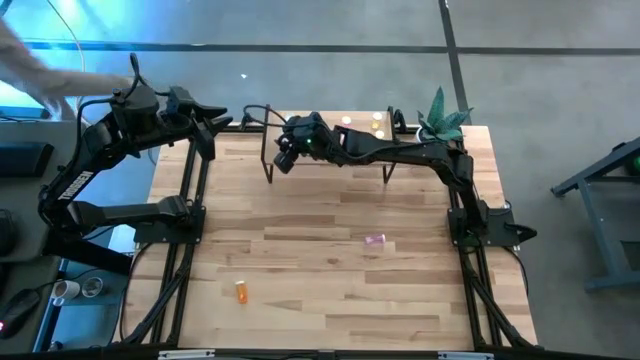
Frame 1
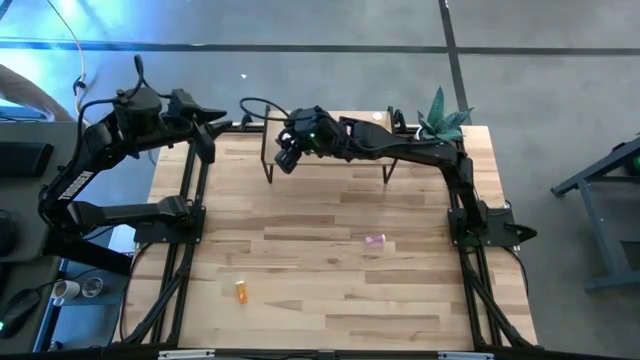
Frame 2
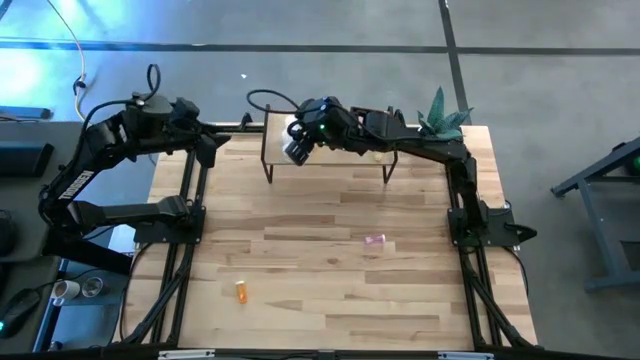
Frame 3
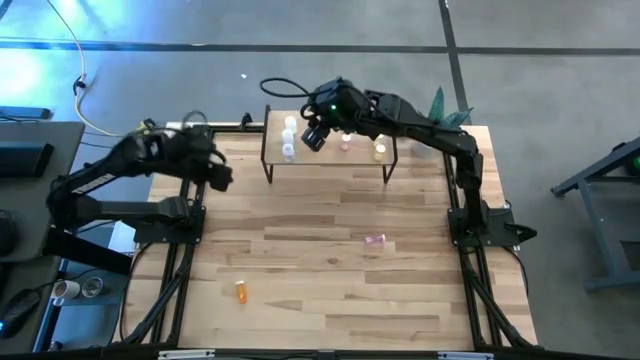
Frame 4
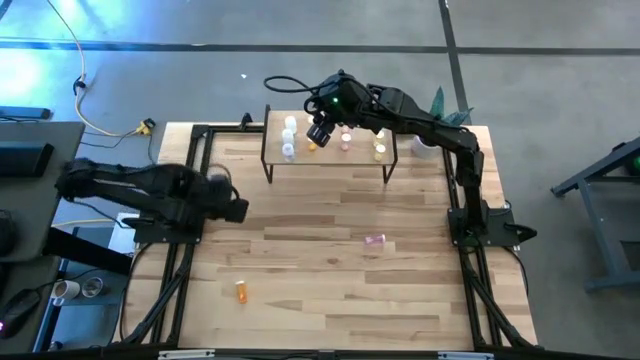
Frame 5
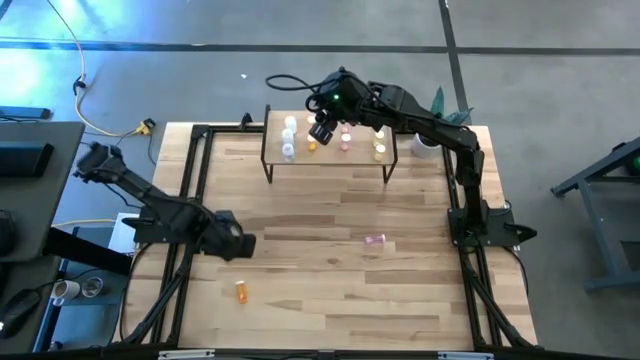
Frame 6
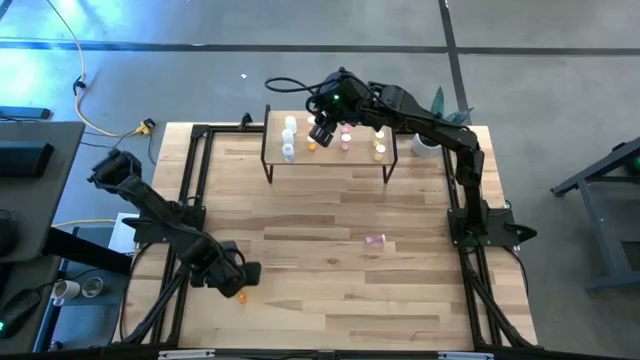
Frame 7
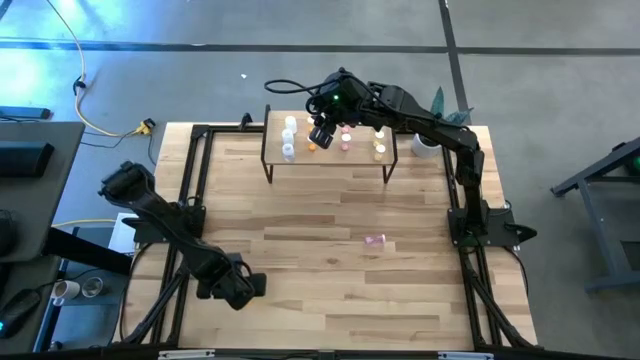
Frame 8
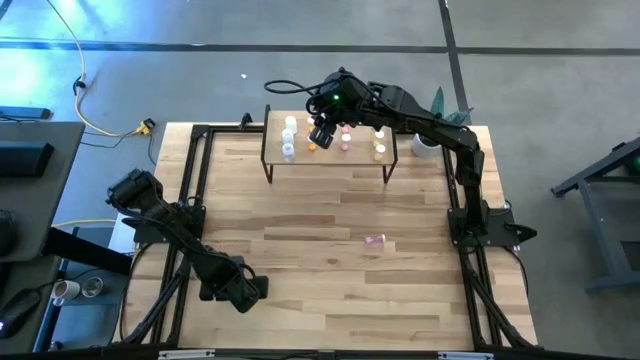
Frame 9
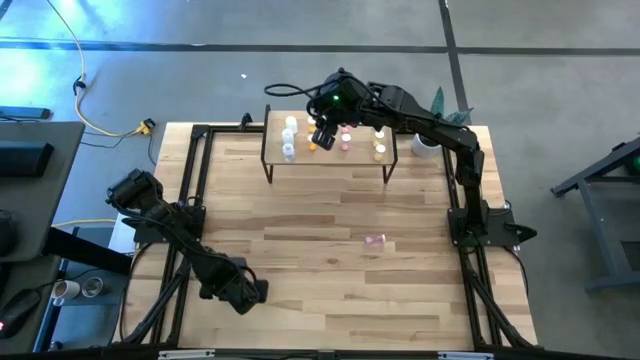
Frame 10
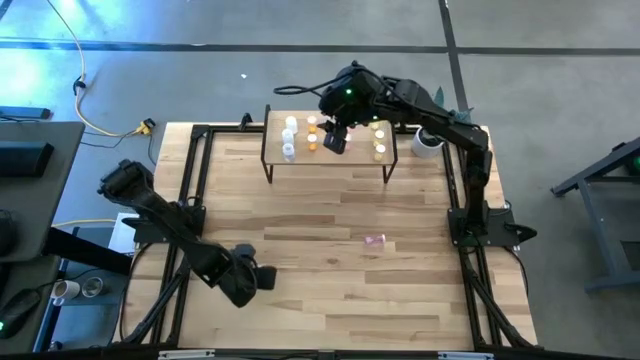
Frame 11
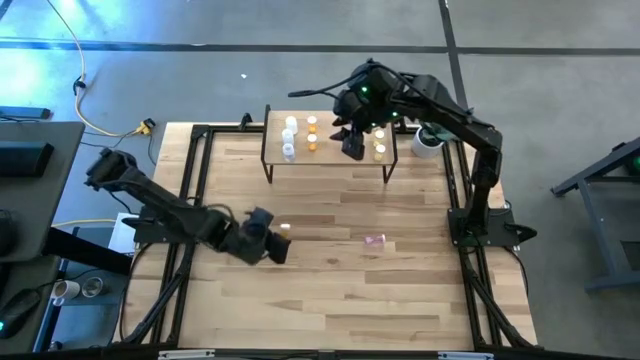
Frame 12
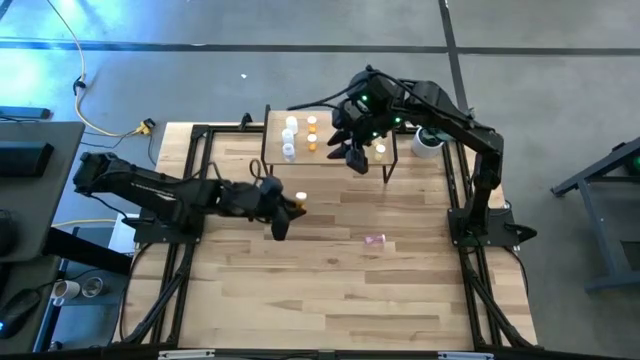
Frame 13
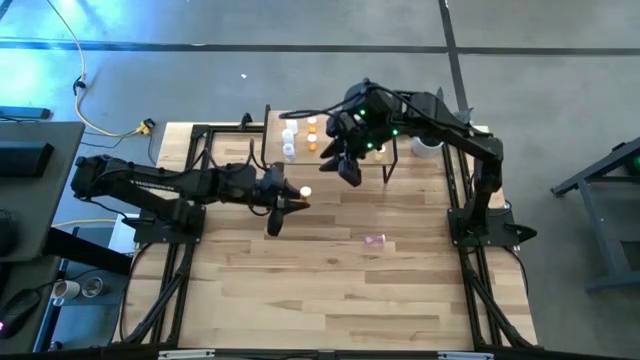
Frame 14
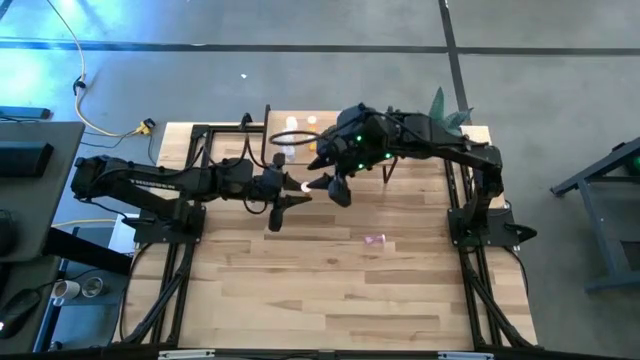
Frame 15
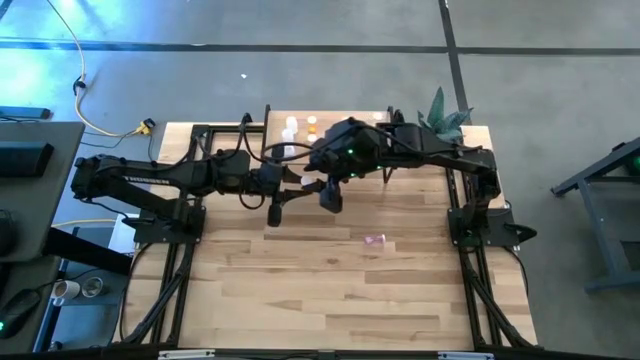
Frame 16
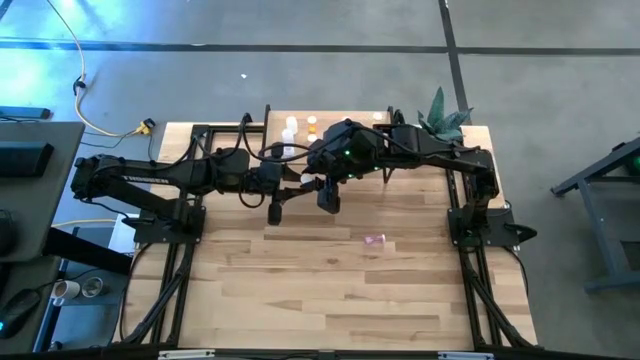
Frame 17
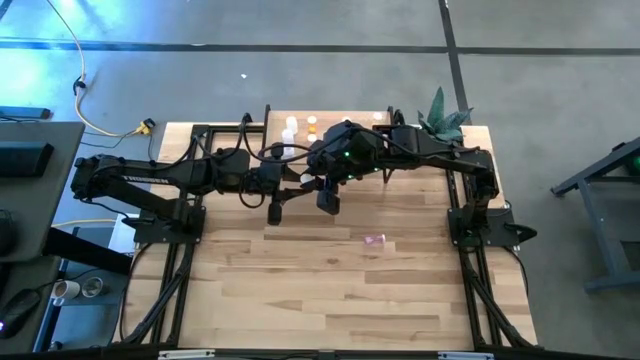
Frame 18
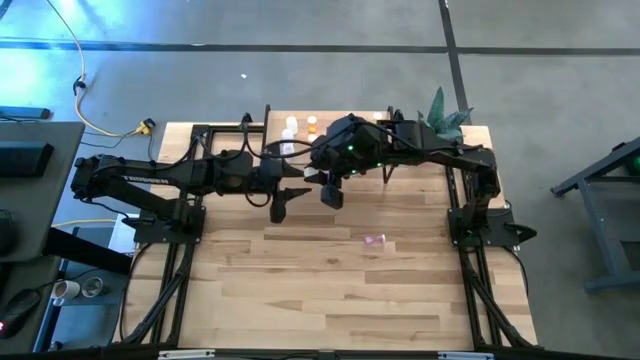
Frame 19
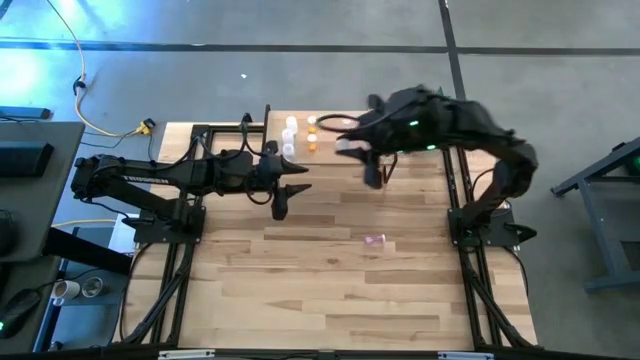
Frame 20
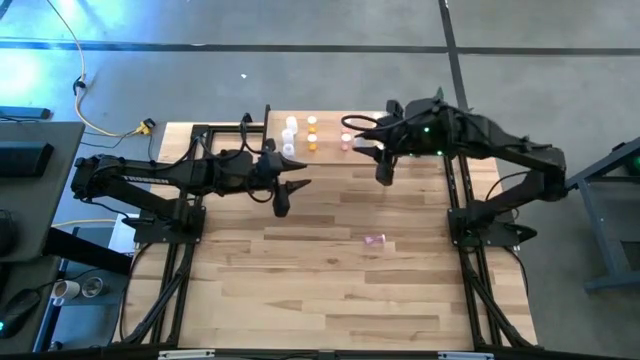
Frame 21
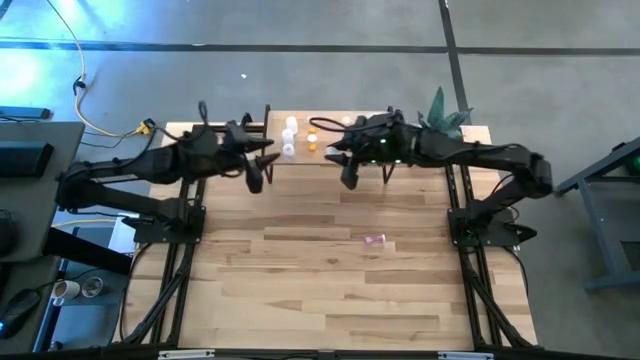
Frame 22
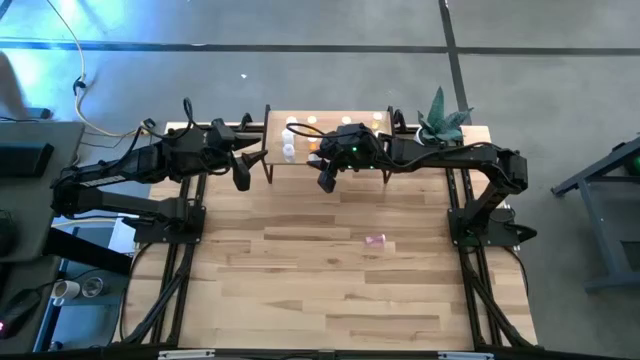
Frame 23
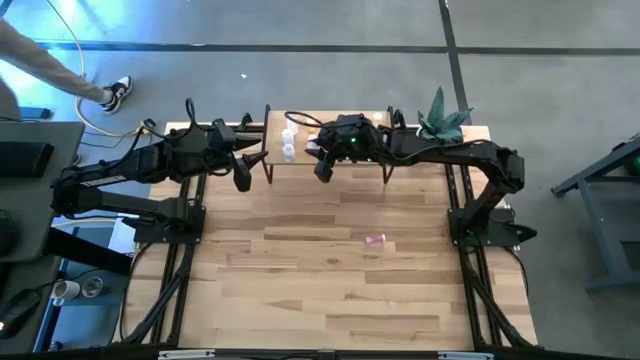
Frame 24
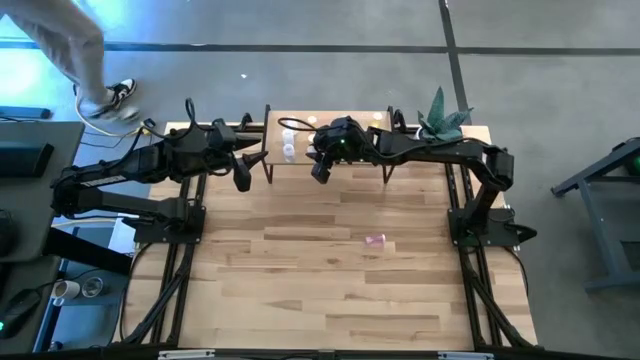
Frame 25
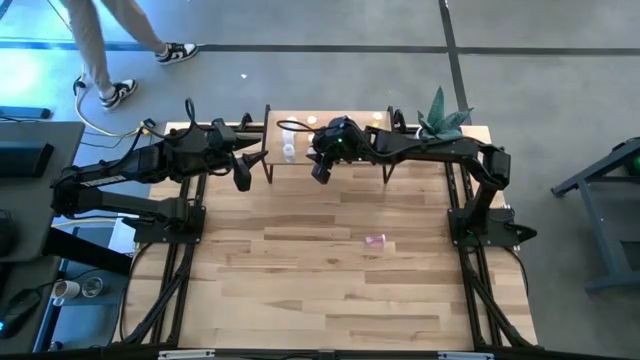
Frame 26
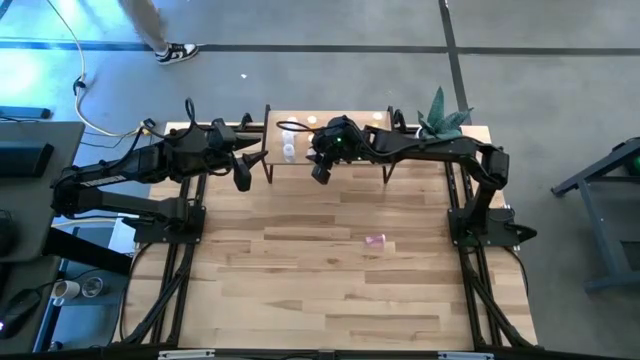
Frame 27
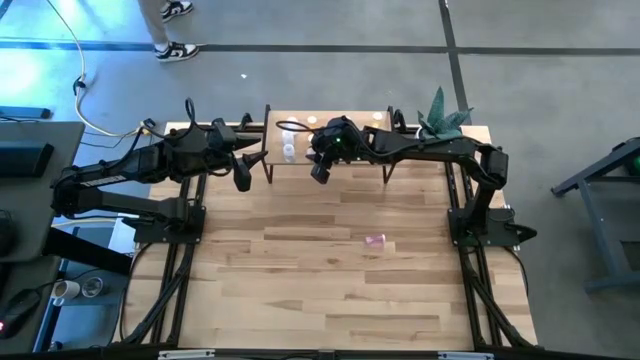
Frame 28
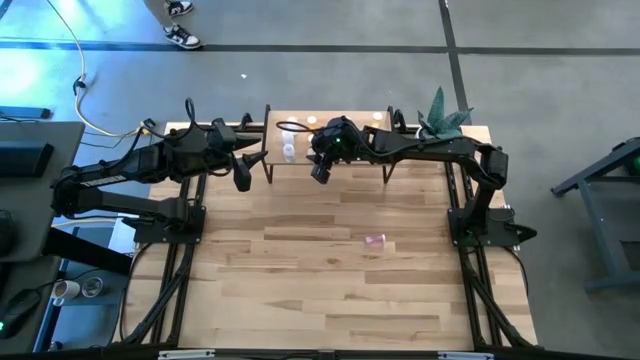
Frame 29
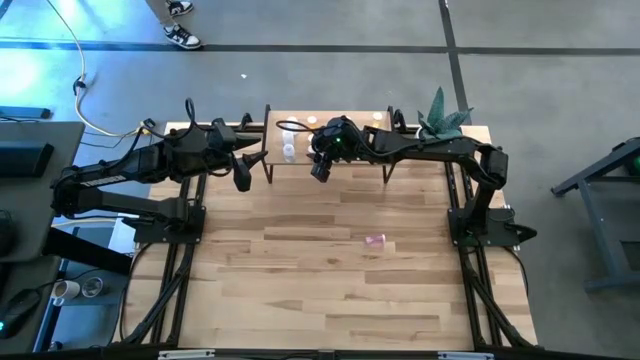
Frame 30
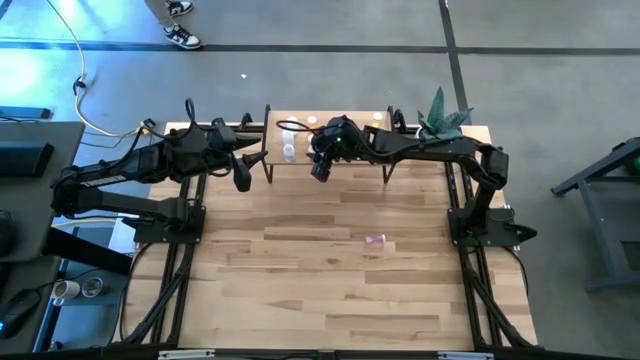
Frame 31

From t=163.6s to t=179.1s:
Task: Pick and place medicine bottles onto shelf by color
Put the orange pill bottle aligned with the other orange pill bottles on the shelf

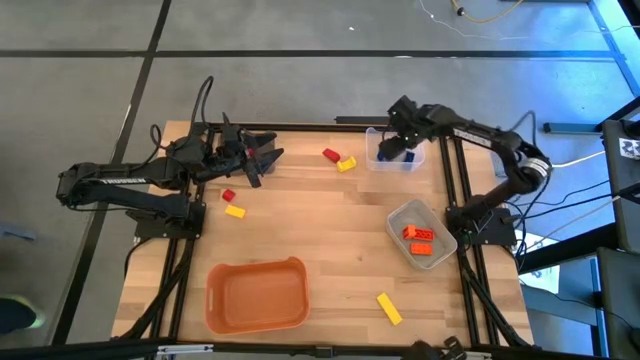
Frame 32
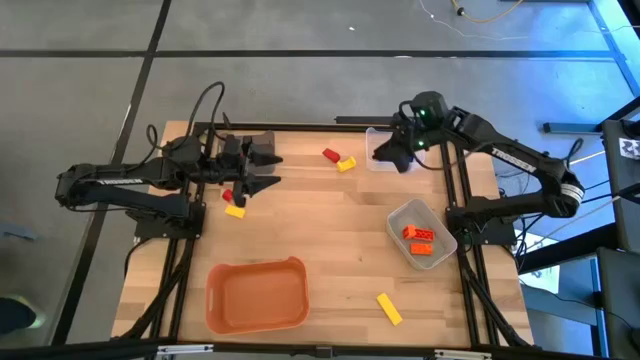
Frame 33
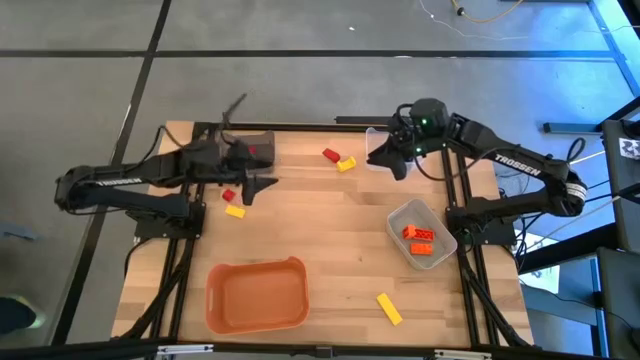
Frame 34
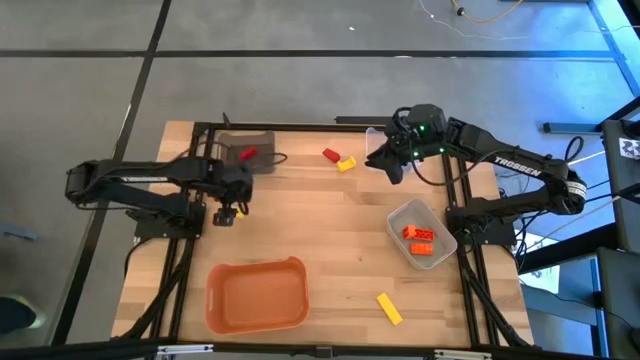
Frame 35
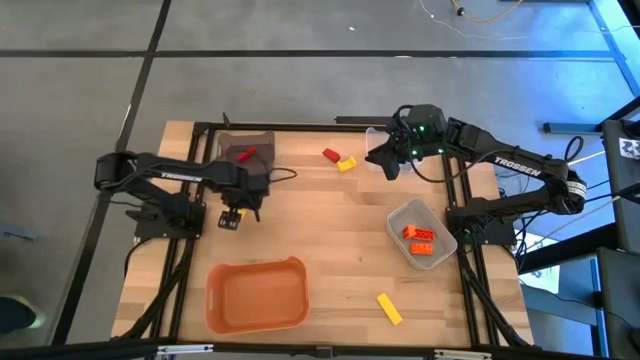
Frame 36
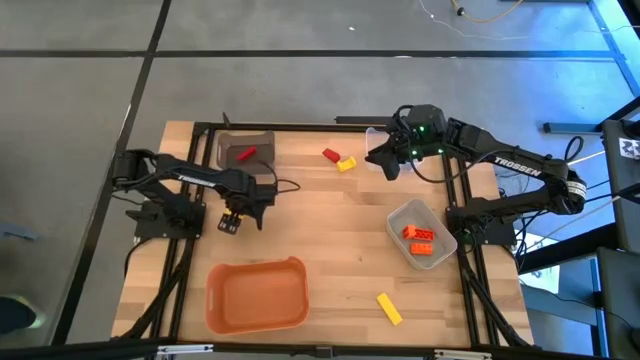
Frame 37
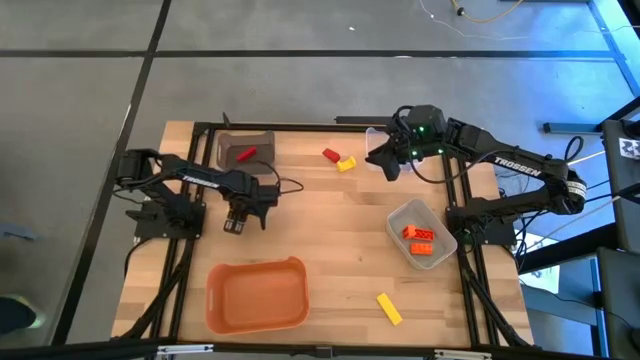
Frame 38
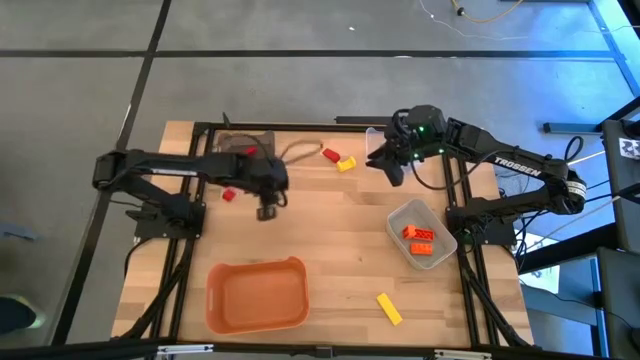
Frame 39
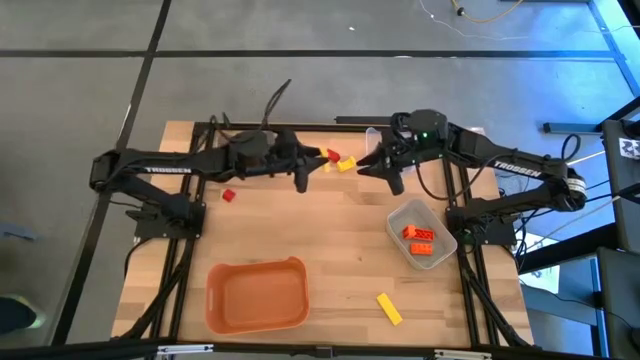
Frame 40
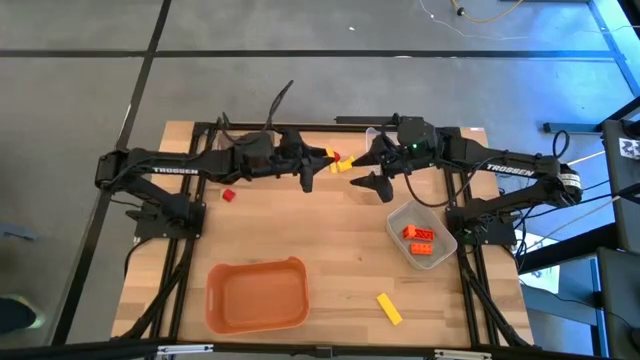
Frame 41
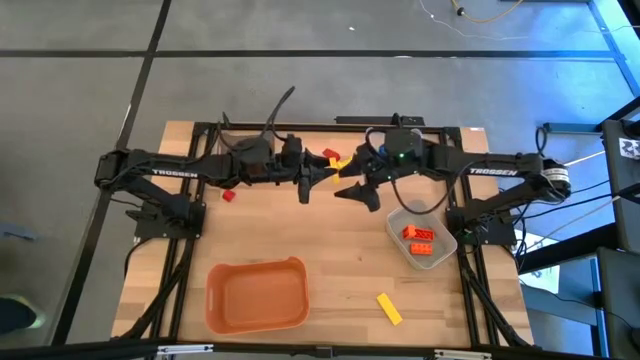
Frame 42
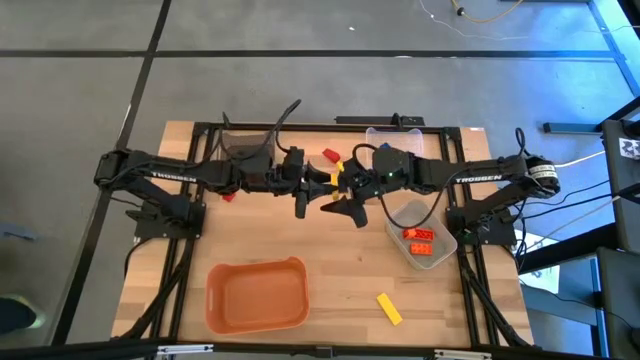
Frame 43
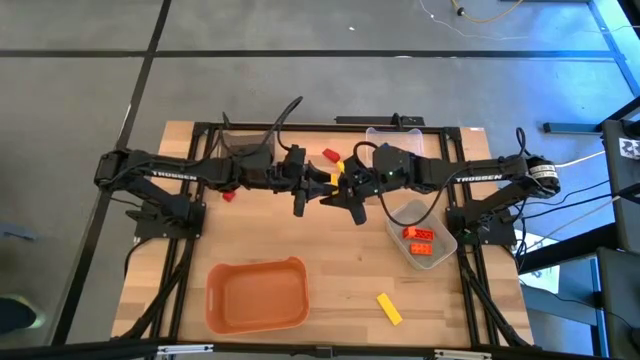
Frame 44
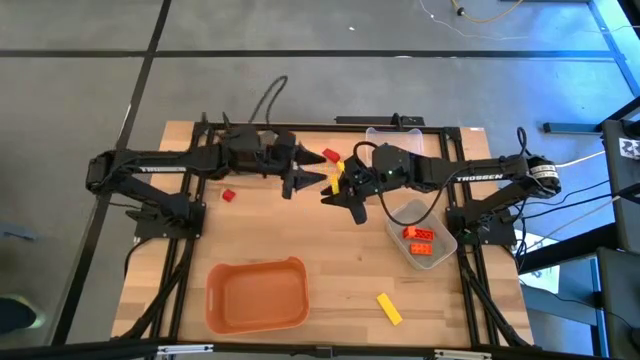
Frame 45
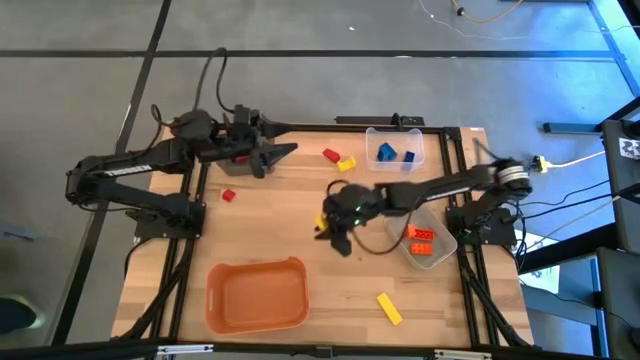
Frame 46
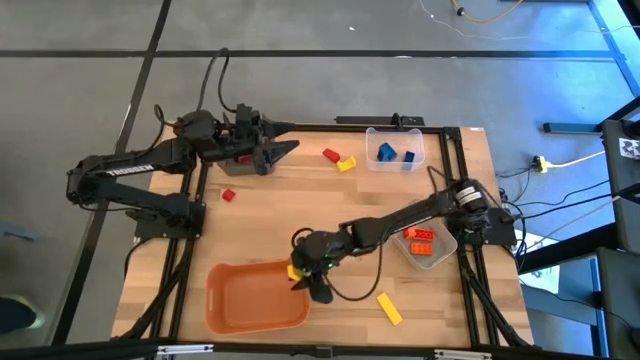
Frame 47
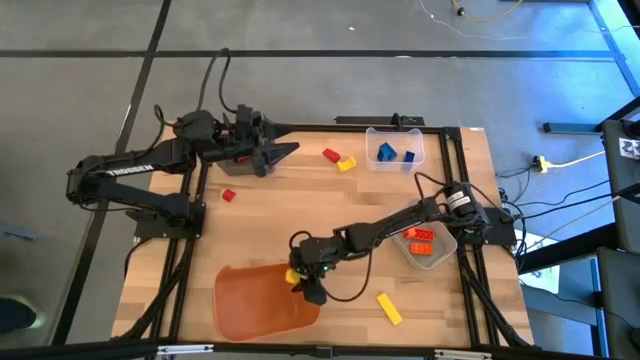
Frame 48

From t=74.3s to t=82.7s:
Task: Sort & place blocks by color
Put the middle yellow block into the orange bin
